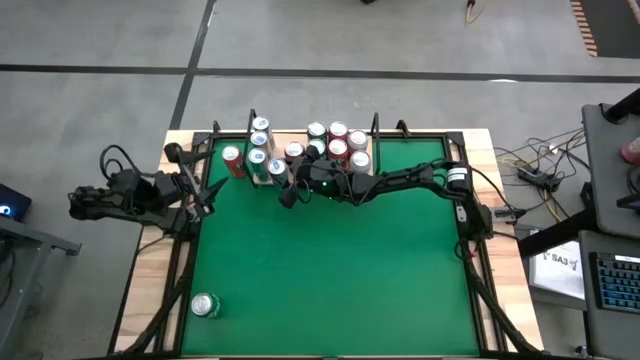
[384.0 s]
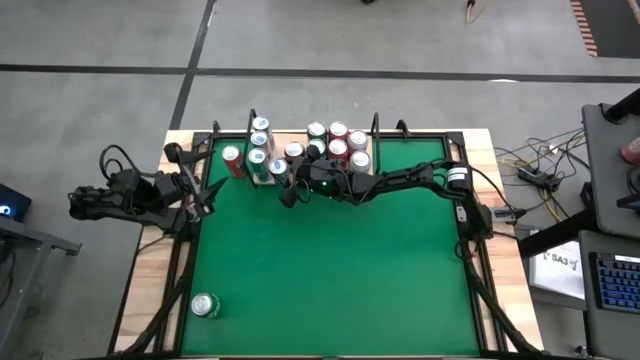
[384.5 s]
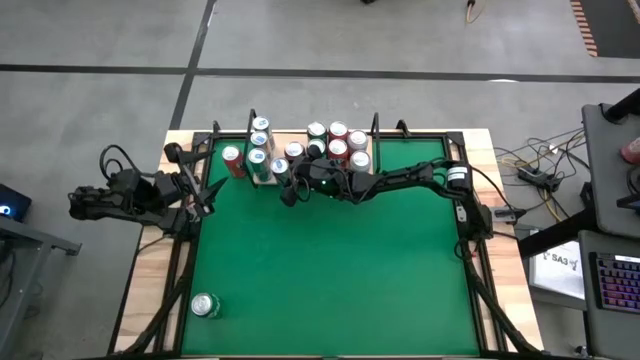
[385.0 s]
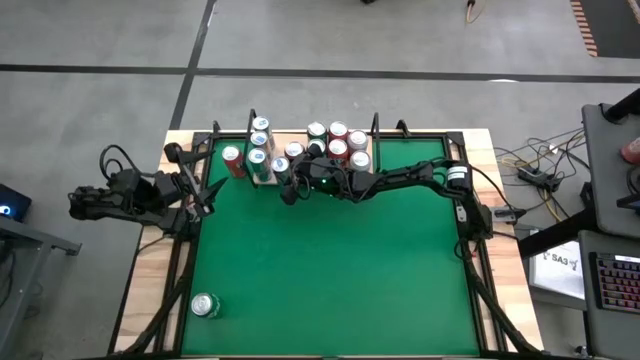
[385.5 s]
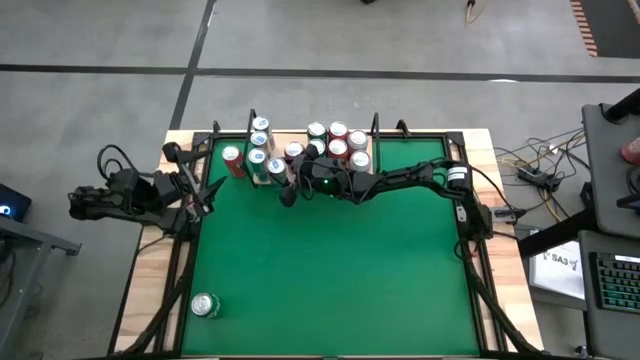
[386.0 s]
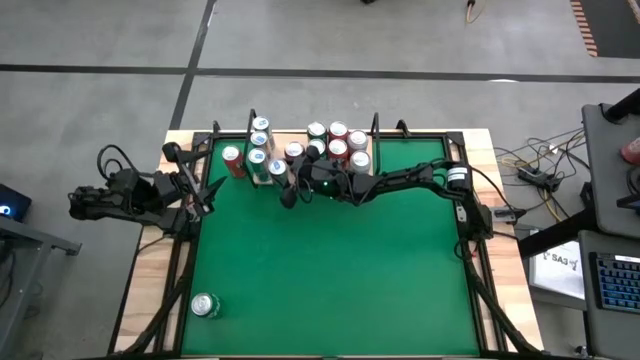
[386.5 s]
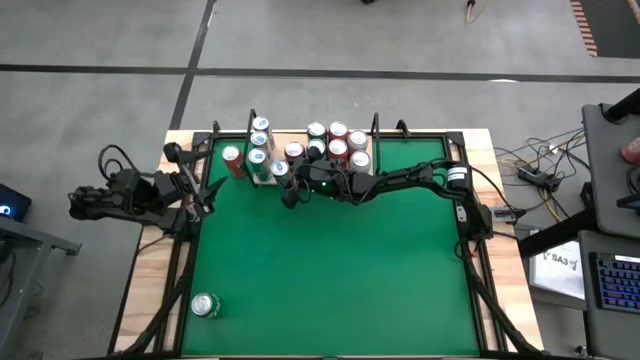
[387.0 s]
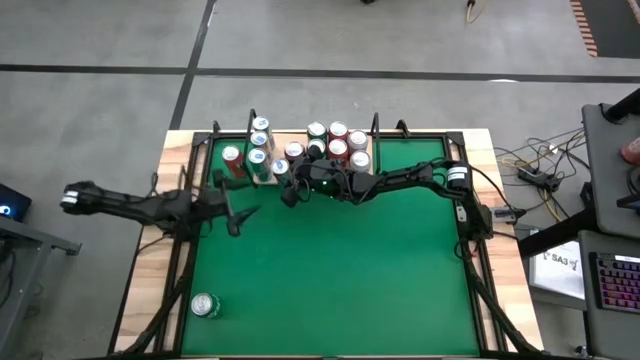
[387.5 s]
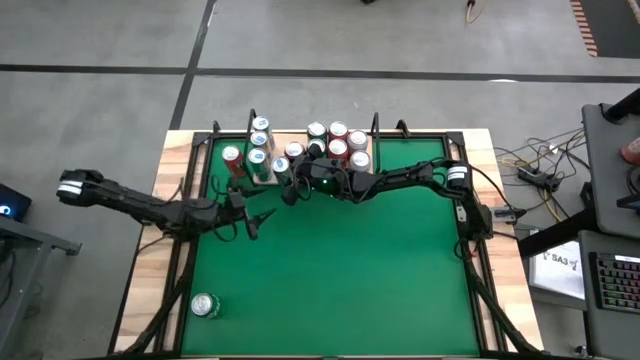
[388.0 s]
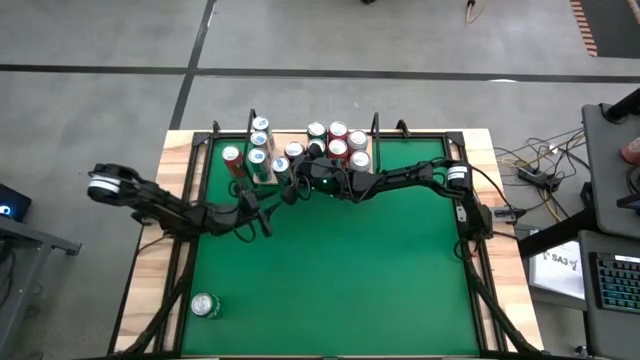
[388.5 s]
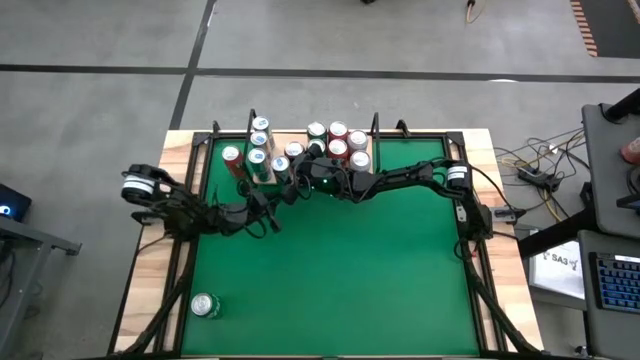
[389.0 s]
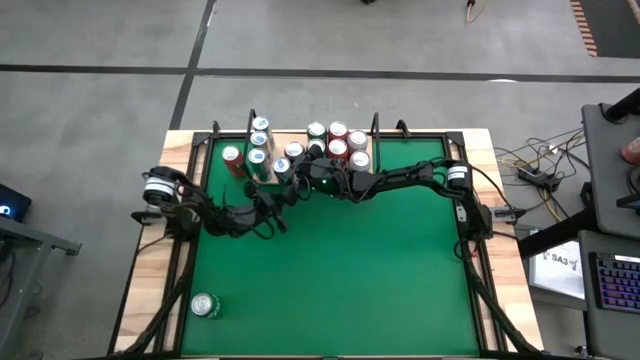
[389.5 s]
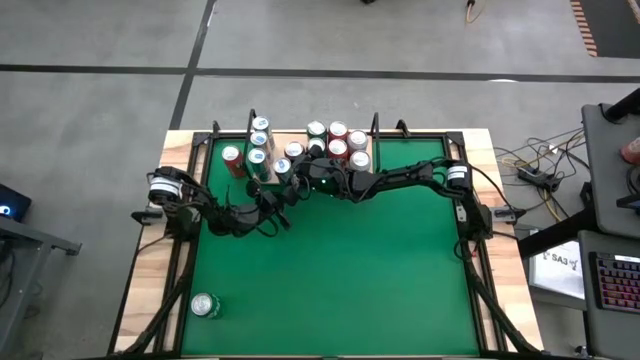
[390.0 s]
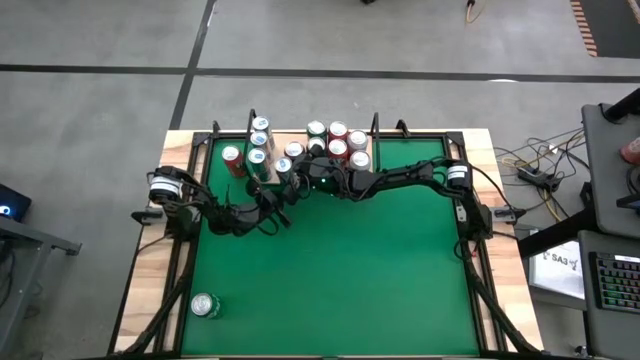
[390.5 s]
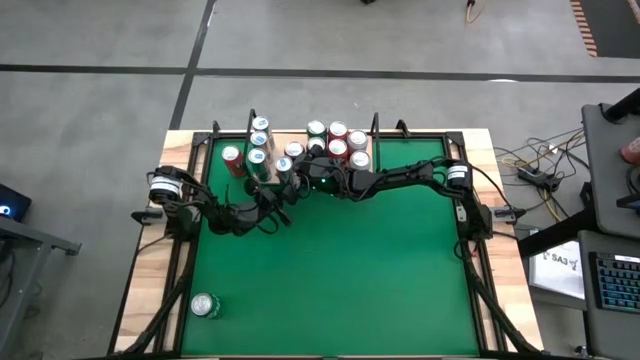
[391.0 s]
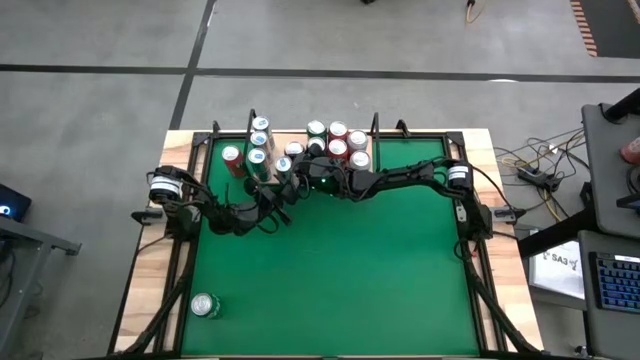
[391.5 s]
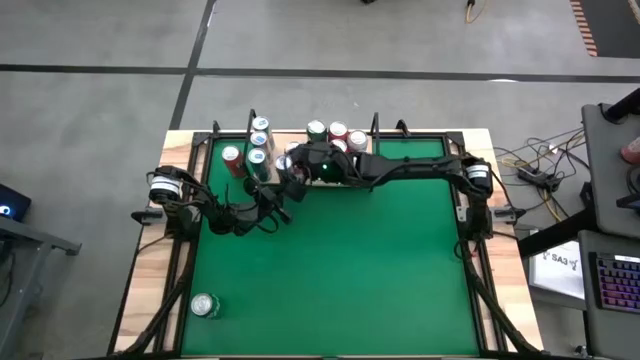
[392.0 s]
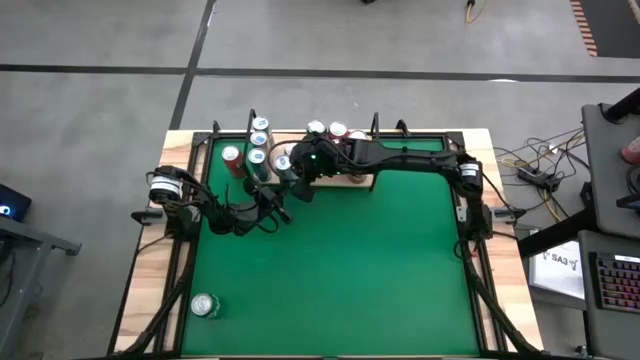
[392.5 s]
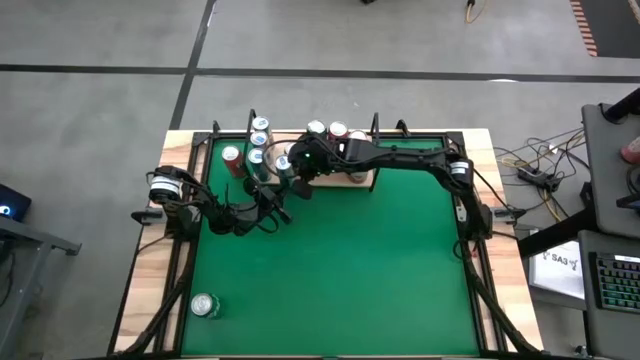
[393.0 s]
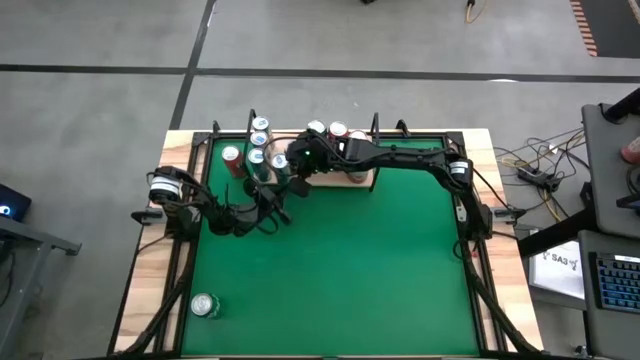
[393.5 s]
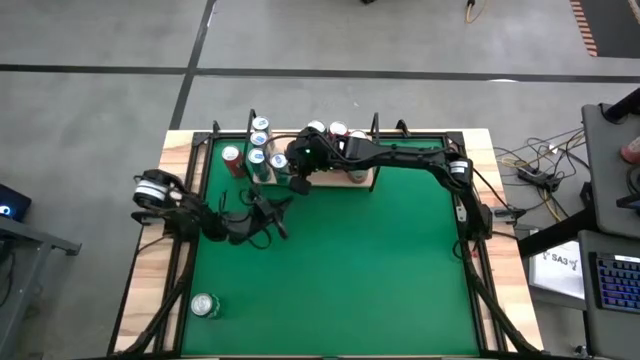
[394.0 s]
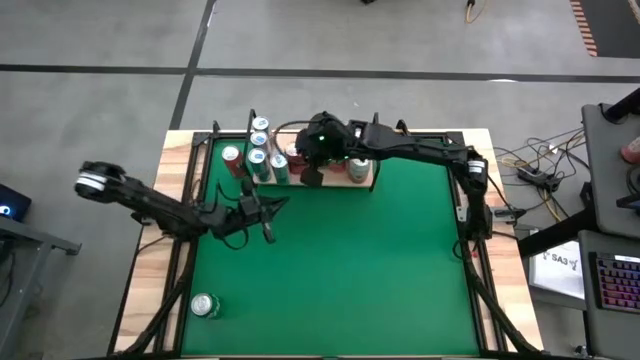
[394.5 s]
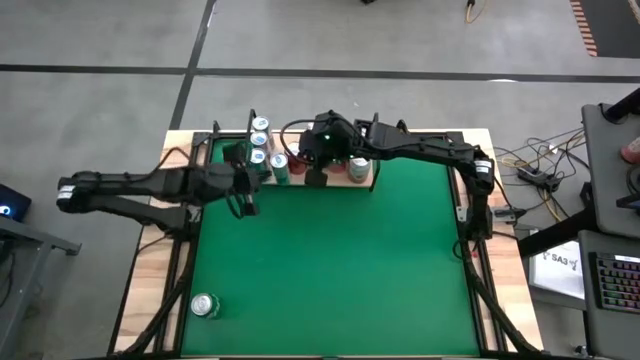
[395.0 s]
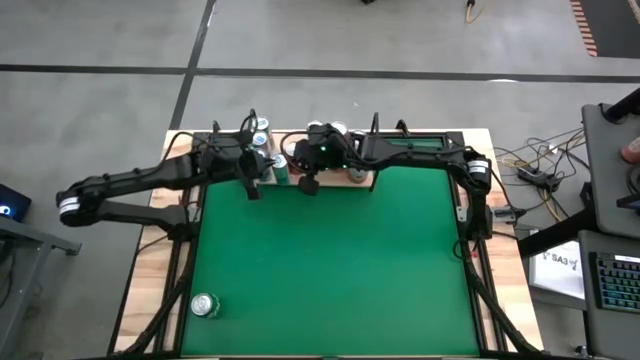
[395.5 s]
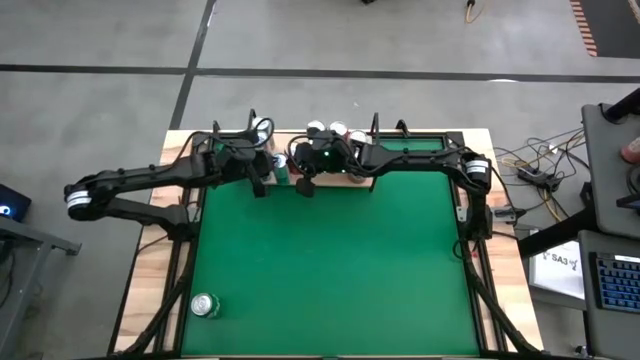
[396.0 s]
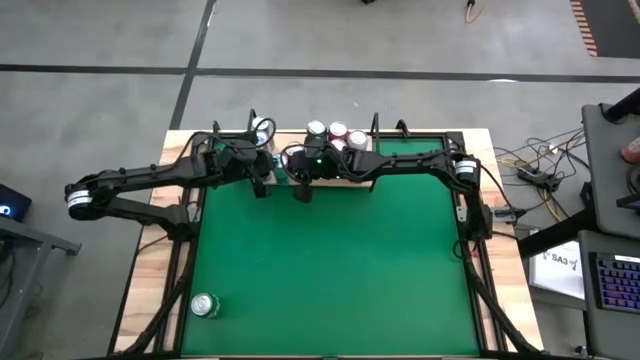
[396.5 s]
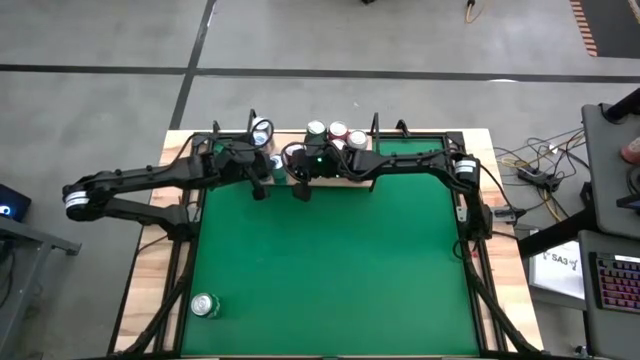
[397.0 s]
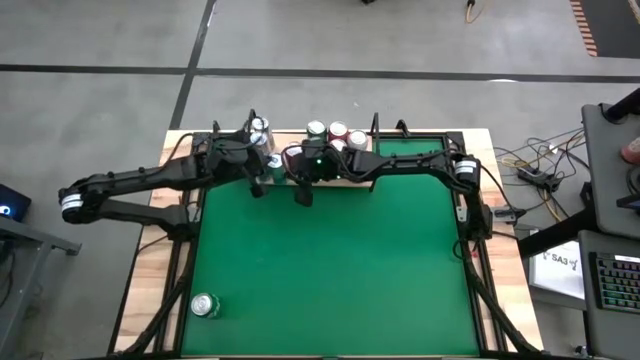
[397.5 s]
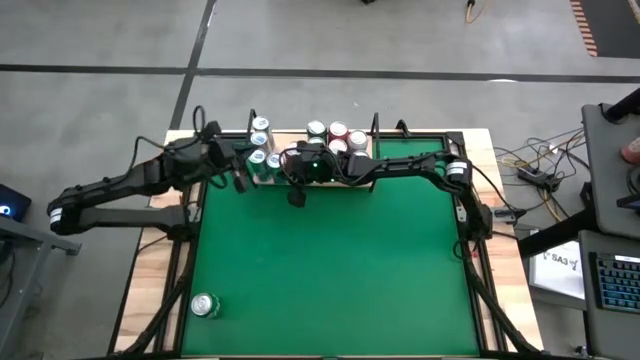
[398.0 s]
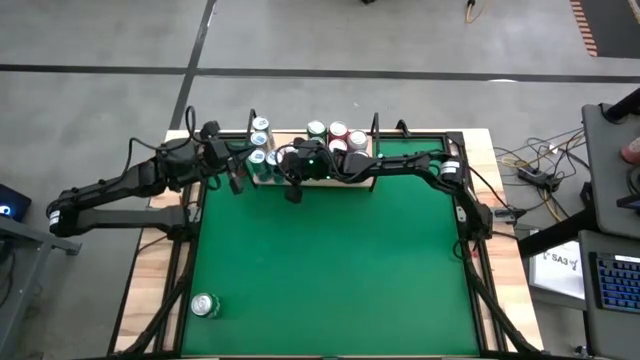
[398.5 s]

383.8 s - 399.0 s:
Task: Pick and place cans onto a shelf
Put the blue silver soda can on the shelf

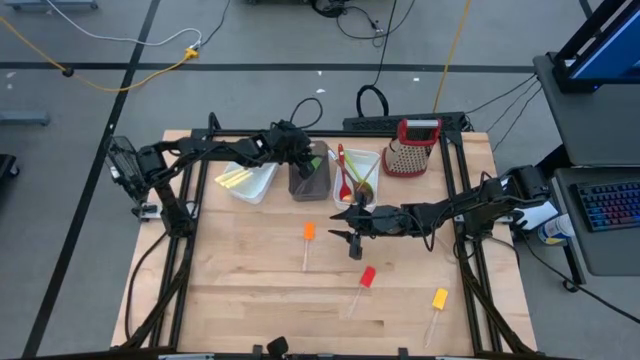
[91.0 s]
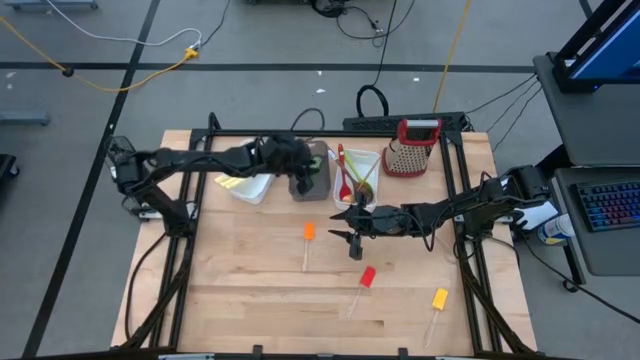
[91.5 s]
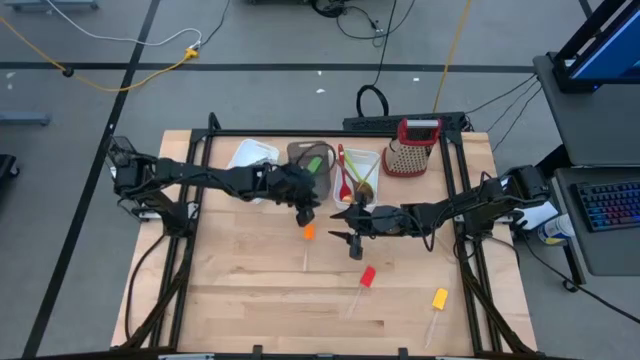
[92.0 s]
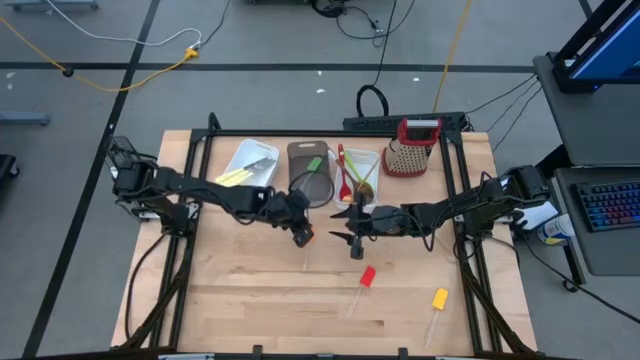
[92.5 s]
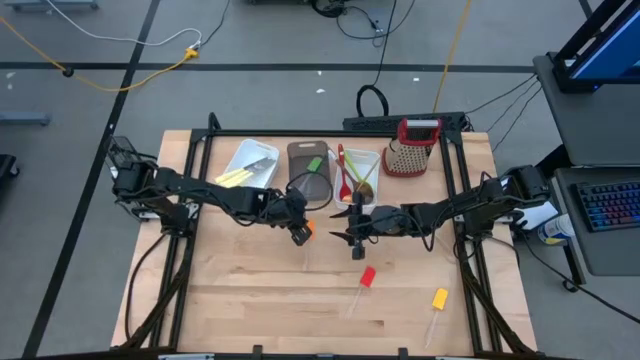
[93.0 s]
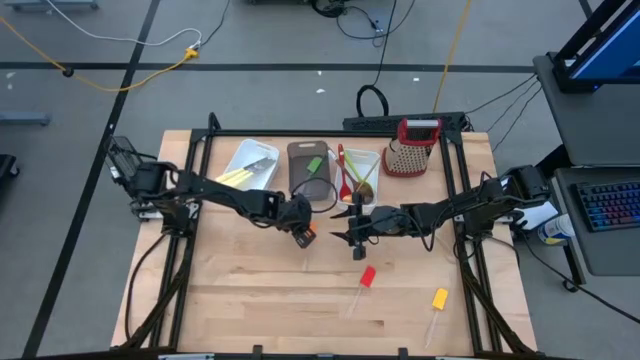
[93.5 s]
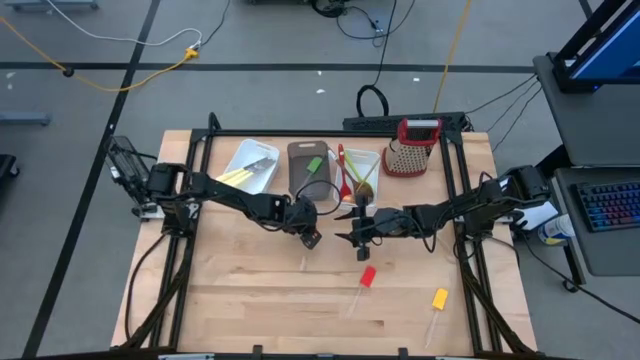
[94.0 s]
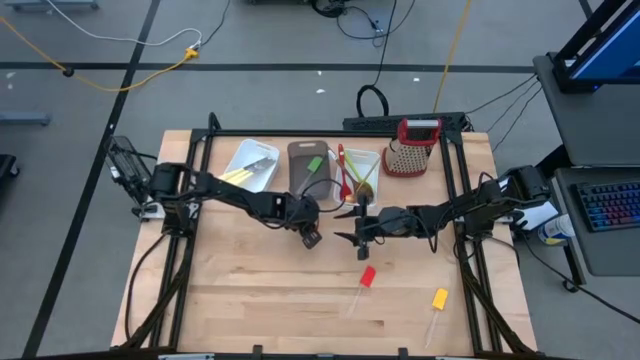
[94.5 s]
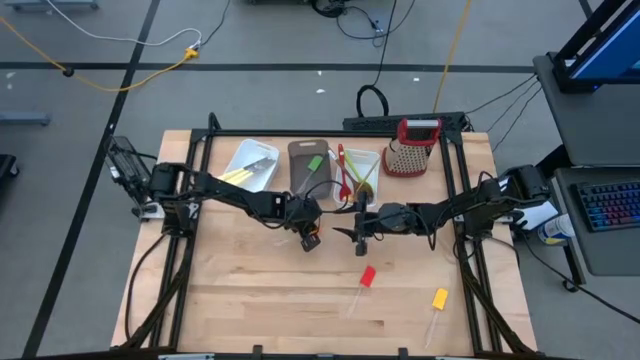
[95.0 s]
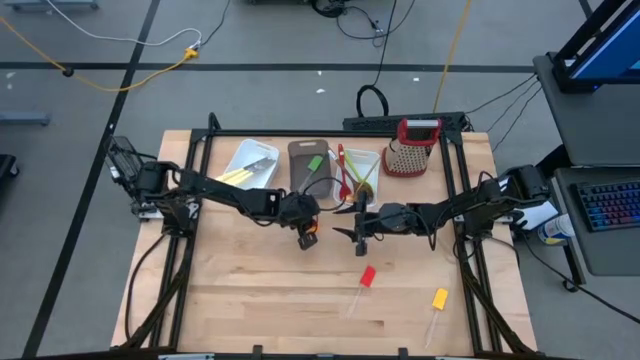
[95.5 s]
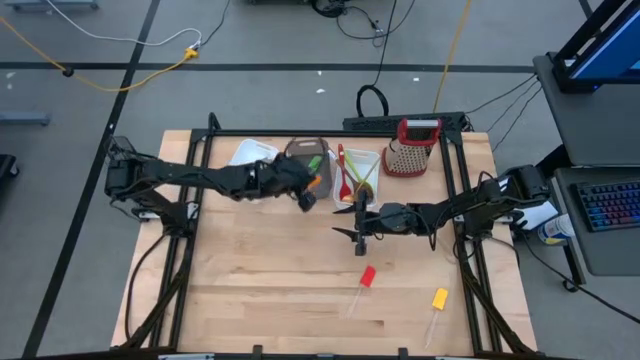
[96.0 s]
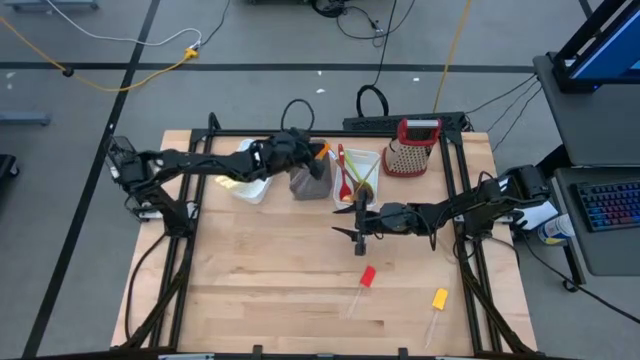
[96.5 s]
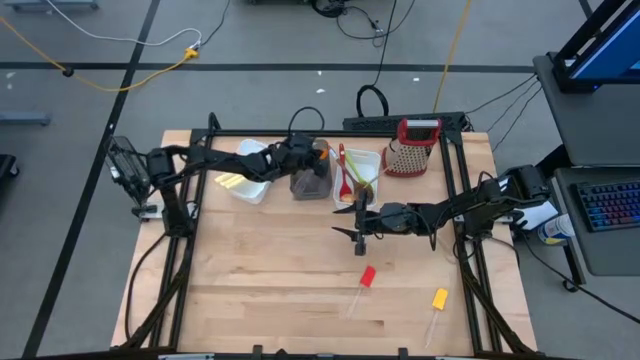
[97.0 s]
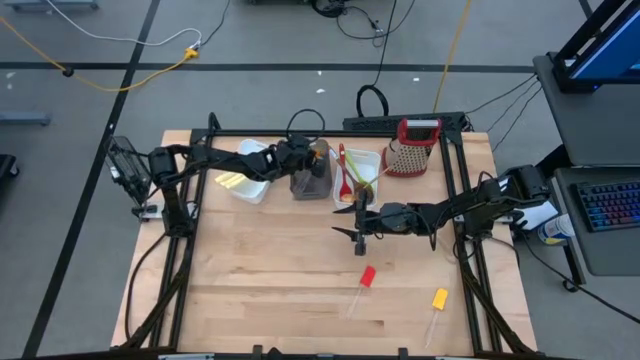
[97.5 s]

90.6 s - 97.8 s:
Task: Pick & Place Kitchen Items
Put the orange spatula into the black bin
